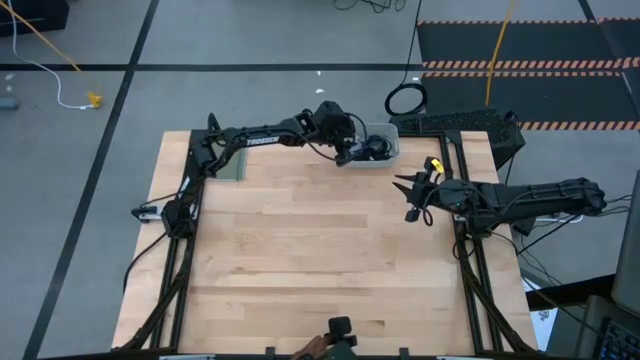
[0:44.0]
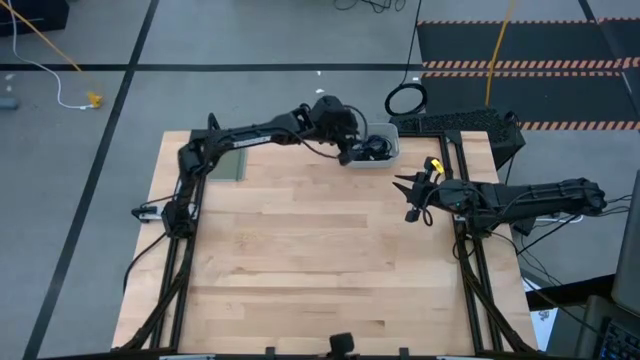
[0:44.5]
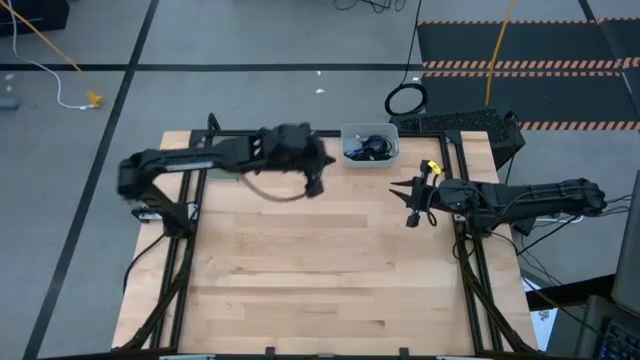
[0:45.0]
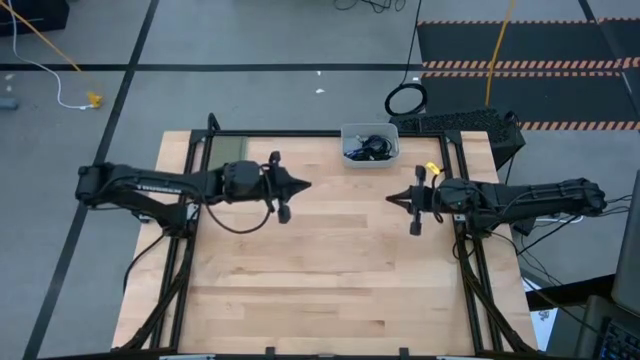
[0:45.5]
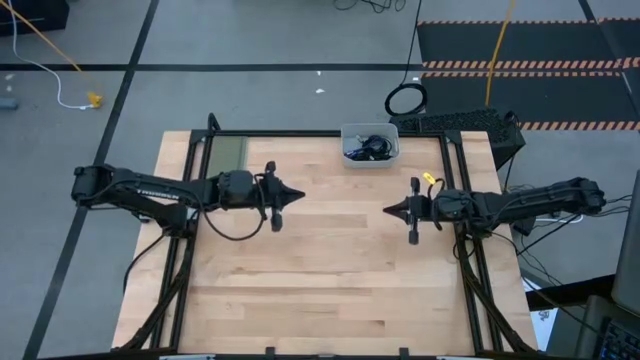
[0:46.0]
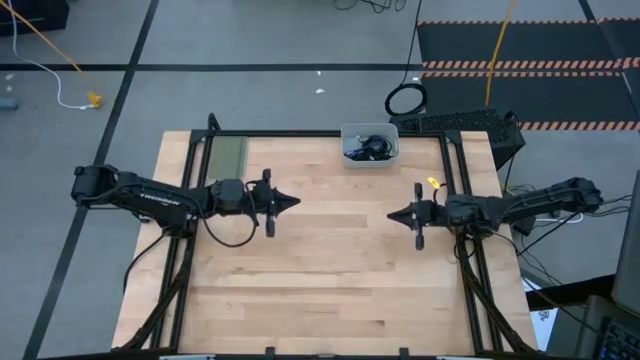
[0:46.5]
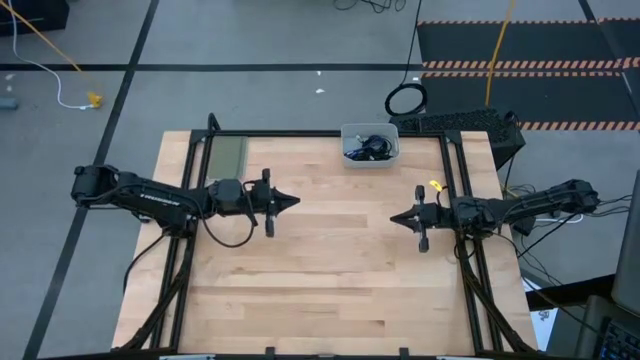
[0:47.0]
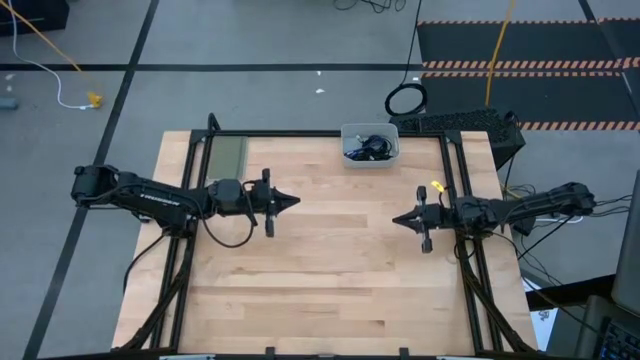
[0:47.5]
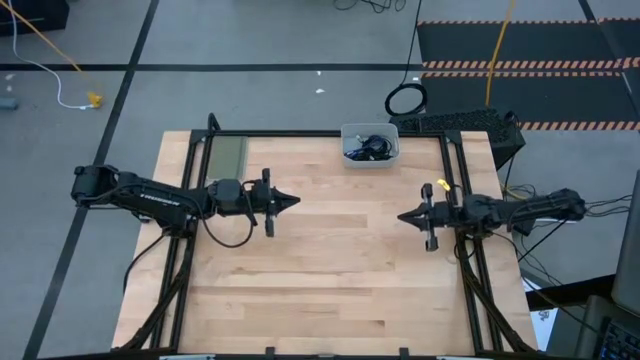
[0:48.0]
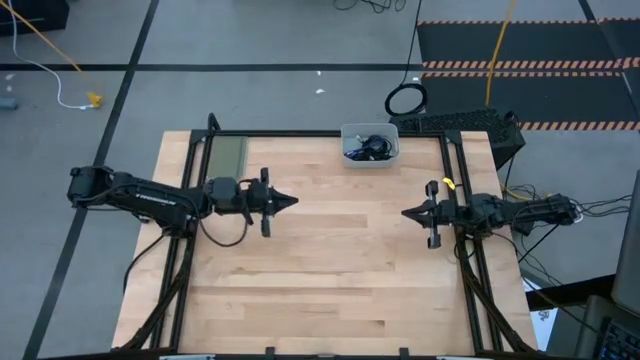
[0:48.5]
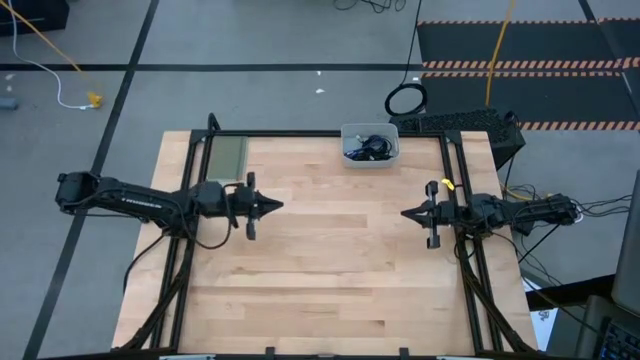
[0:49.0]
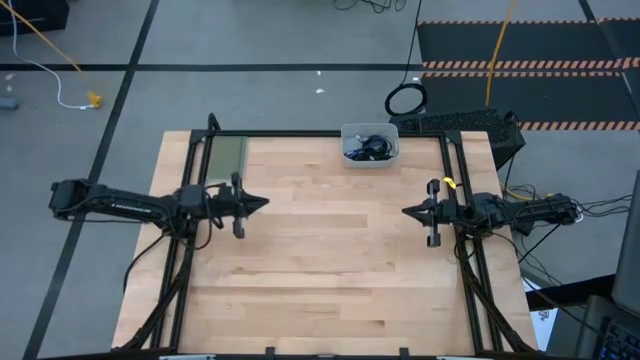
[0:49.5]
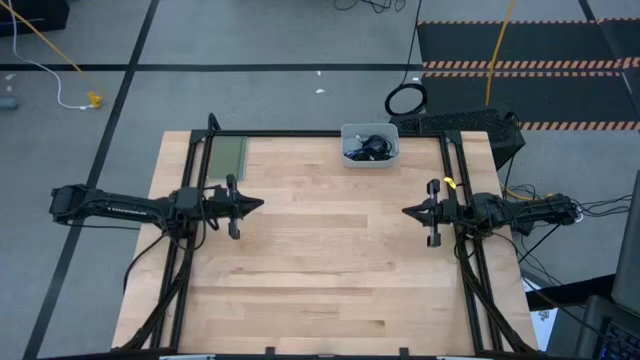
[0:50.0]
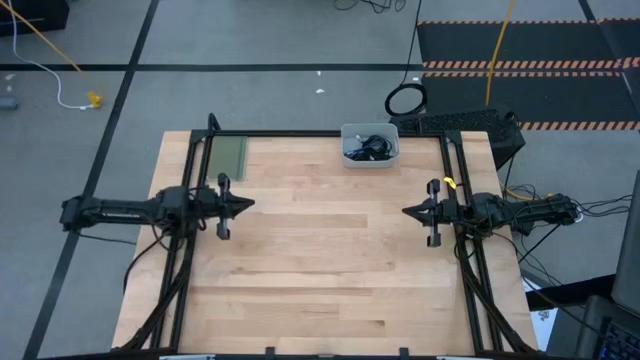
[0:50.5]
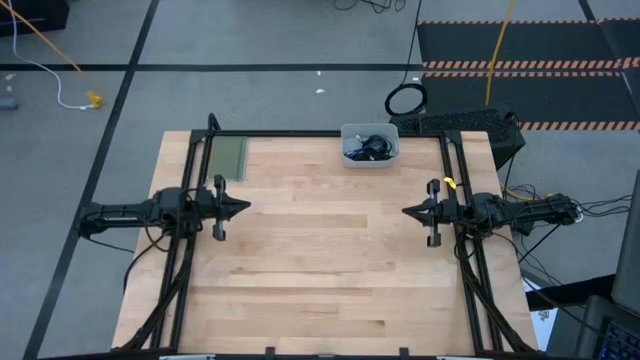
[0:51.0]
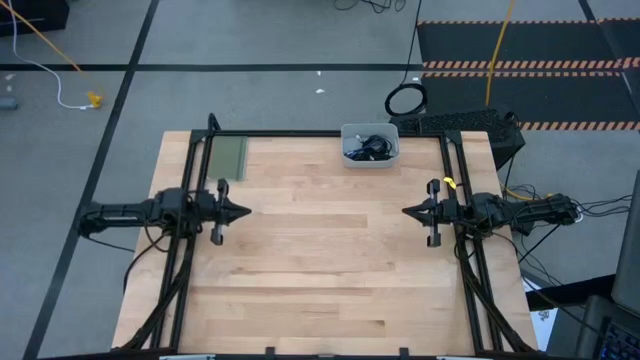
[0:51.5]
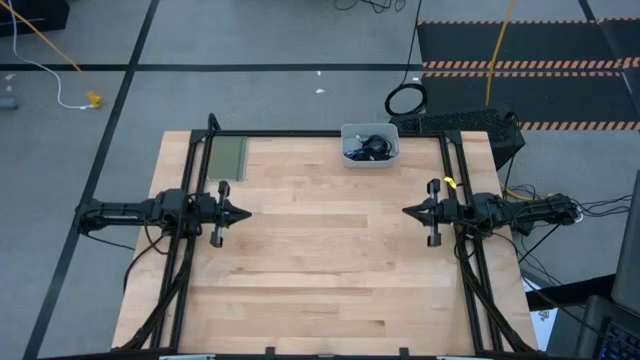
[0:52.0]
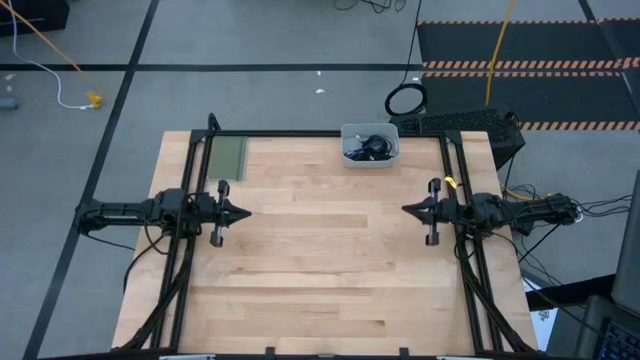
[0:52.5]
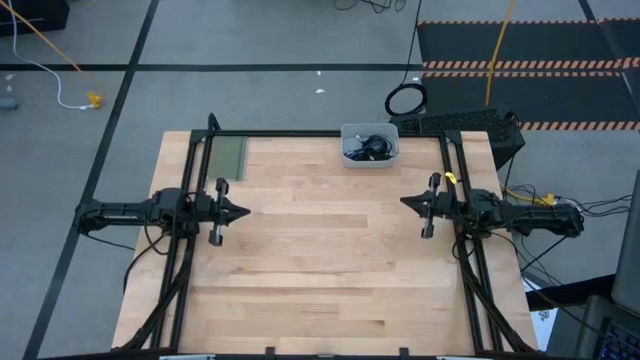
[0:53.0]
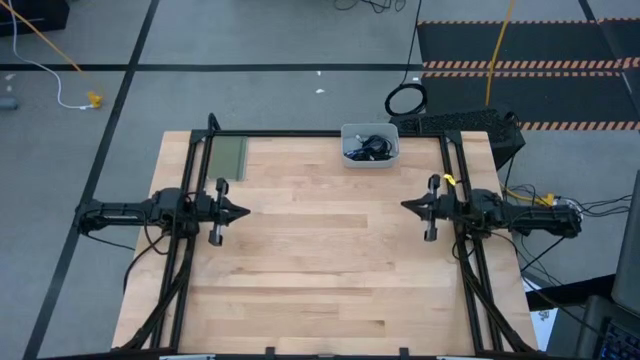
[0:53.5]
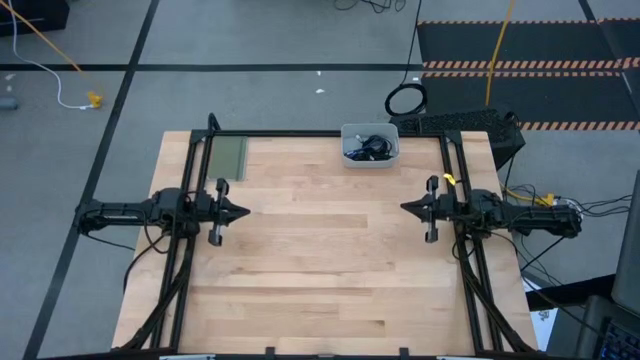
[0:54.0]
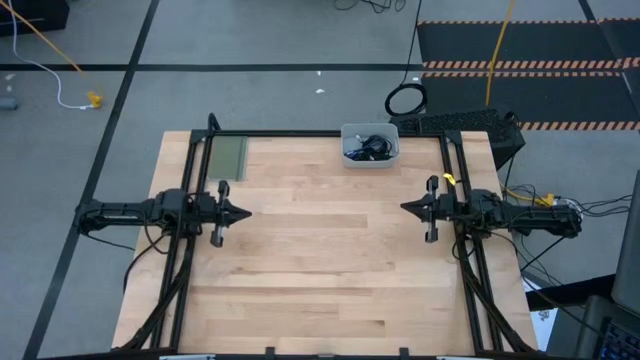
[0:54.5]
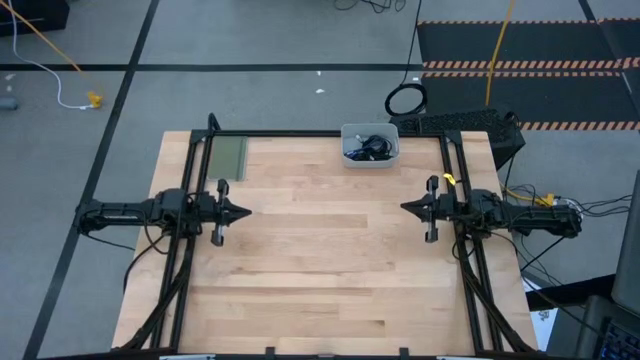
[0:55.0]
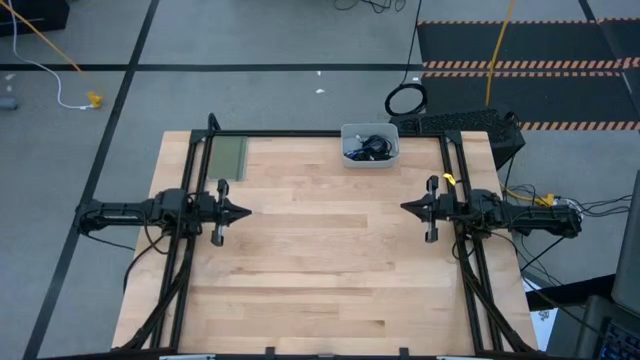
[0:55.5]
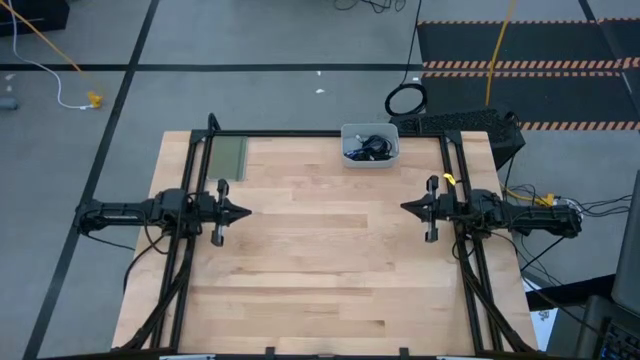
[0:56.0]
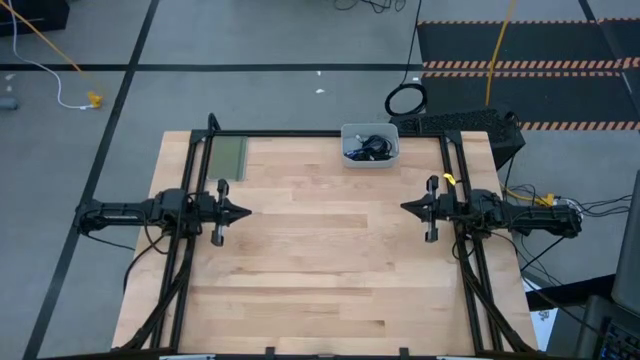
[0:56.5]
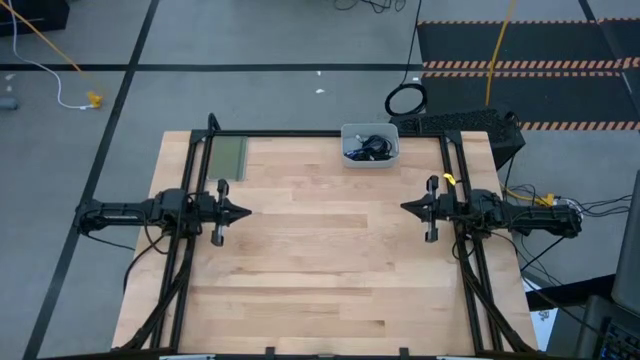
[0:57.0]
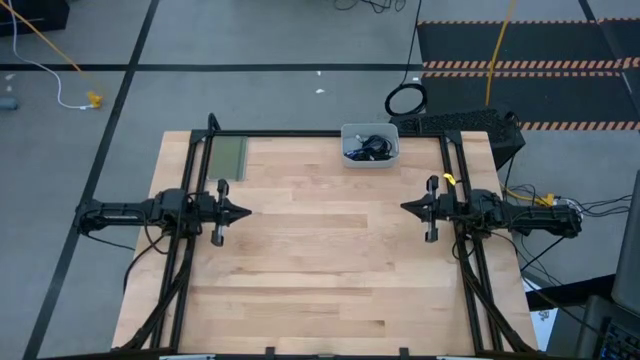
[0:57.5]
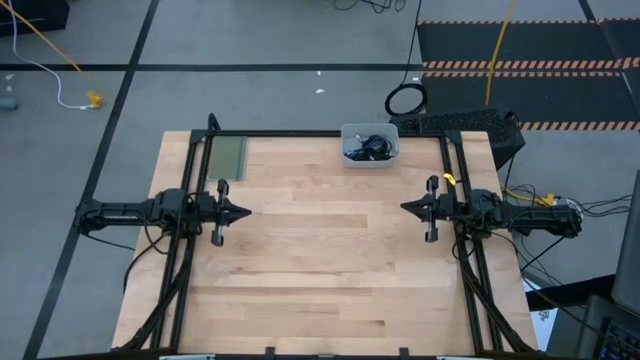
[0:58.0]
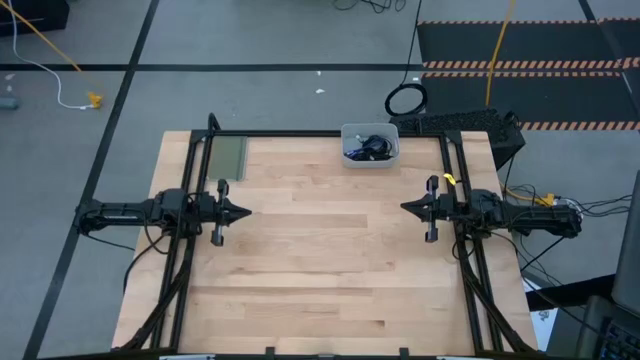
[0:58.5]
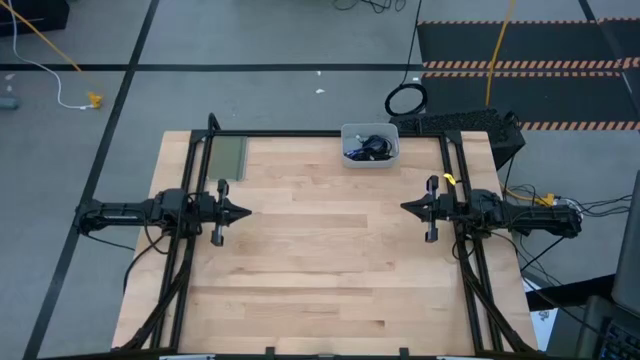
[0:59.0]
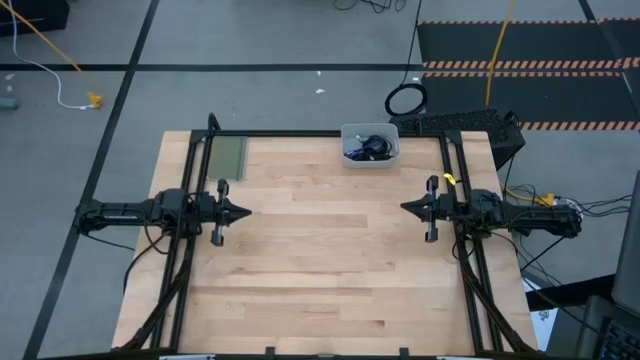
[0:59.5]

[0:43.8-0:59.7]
Task: Pick and place USB-C Cables
Return to Home Position

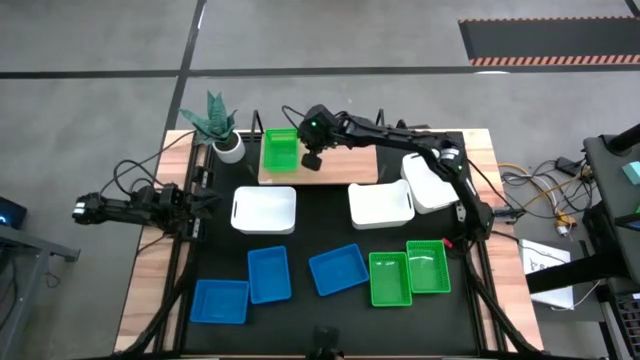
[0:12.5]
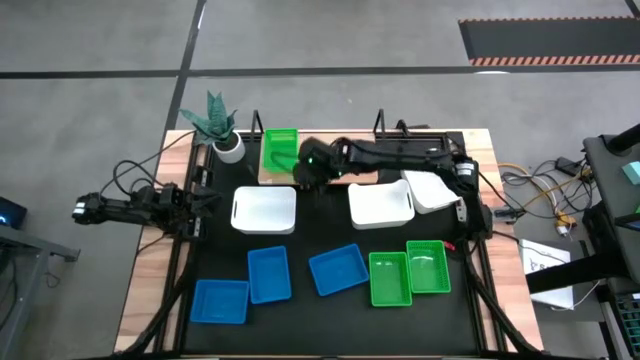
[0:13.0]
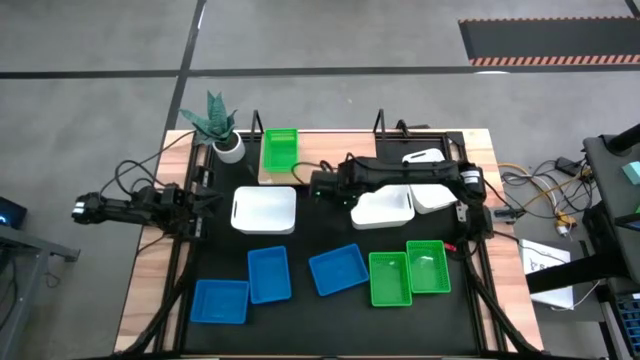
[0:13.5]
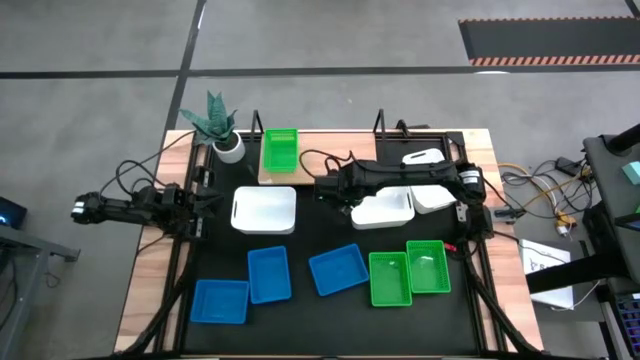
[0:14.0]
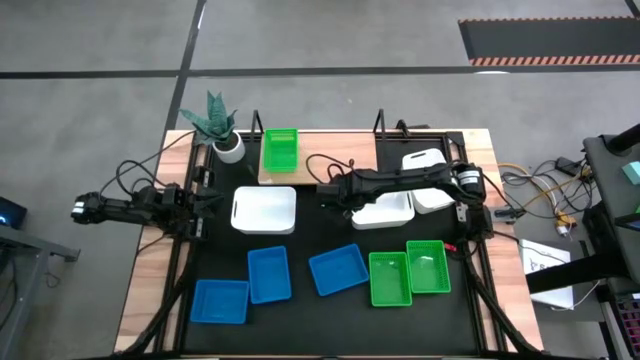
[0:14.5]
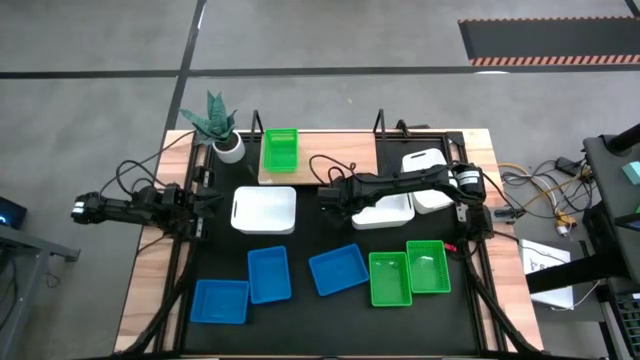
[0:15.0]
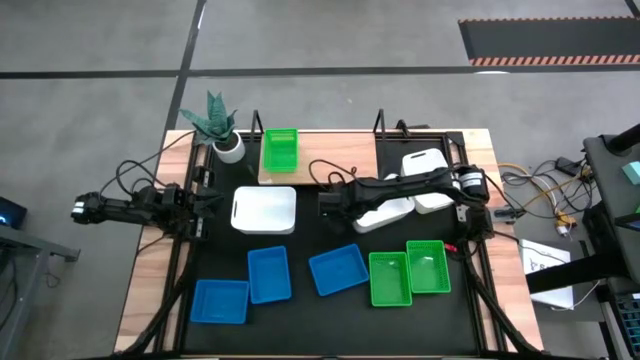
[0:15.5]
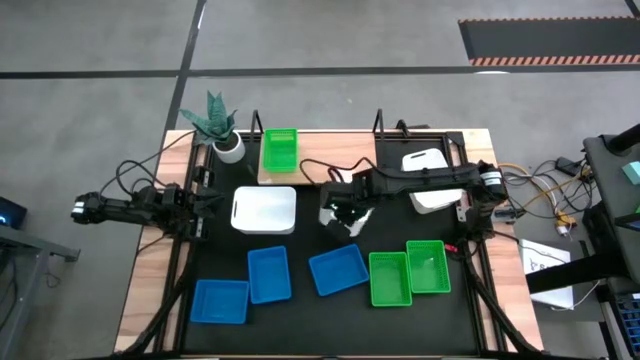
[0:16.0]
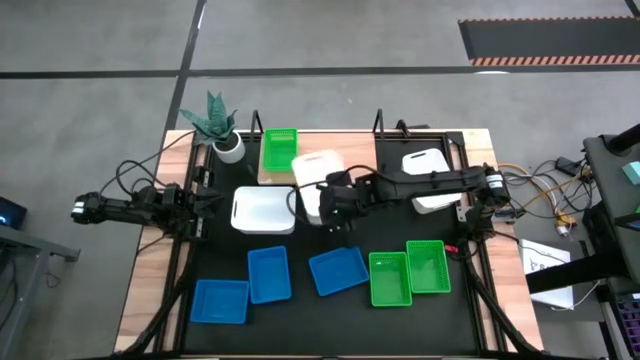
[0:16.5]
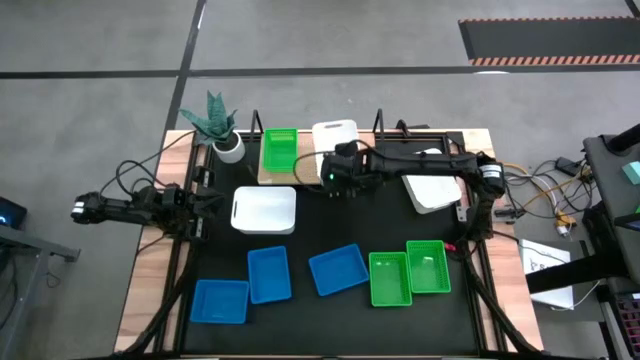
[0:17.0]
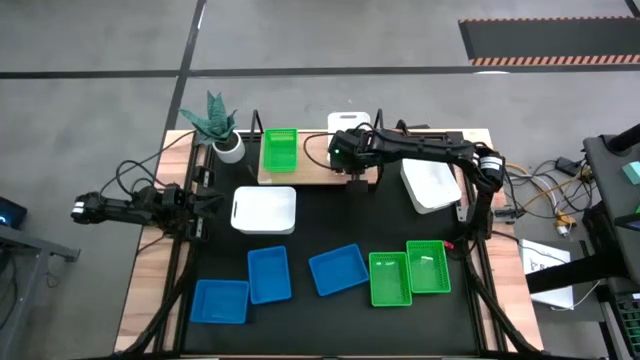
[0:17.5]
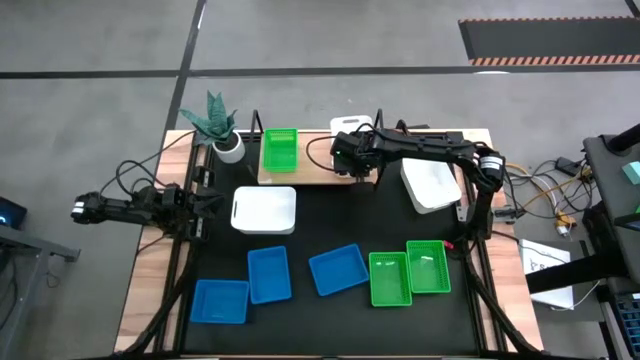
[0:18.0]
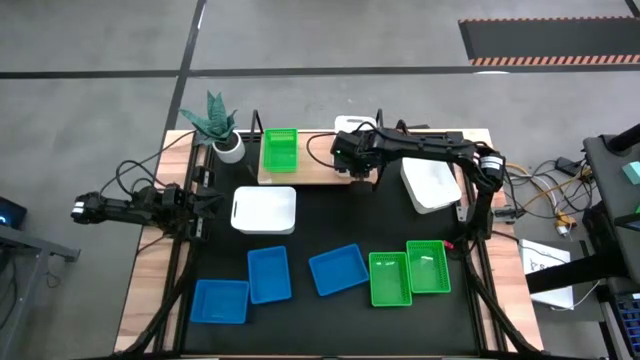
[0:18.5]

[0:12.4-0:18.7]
Task: Stack baskets on shelf by color
Put the middle white bin on the shelf
